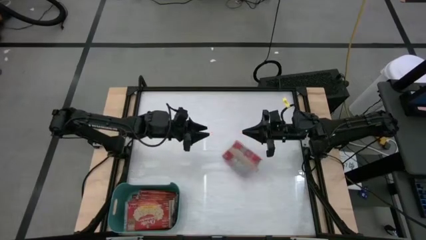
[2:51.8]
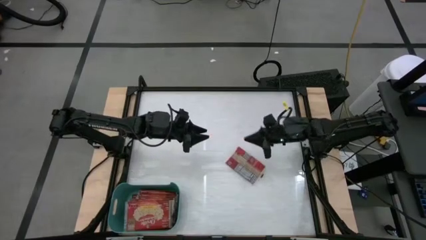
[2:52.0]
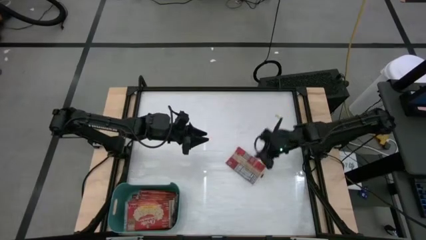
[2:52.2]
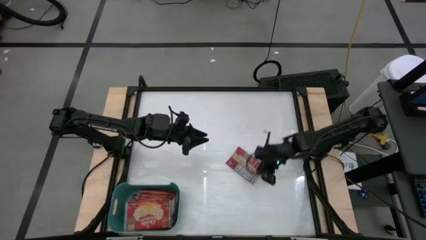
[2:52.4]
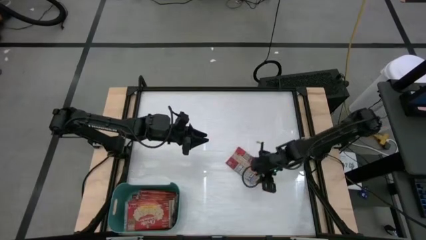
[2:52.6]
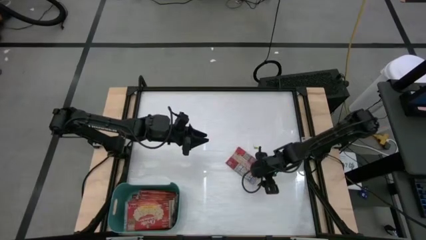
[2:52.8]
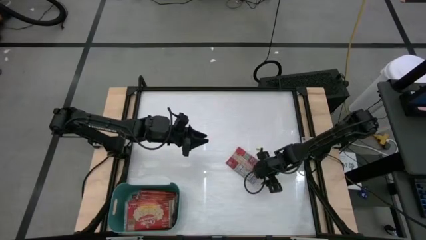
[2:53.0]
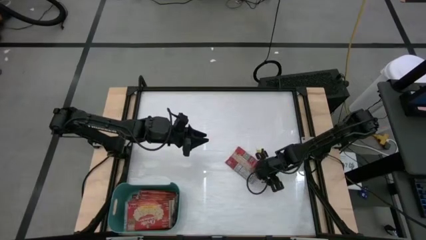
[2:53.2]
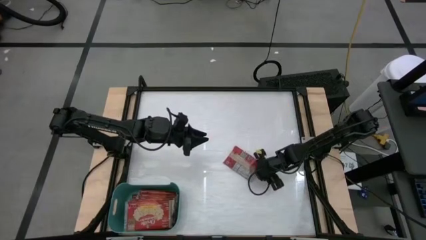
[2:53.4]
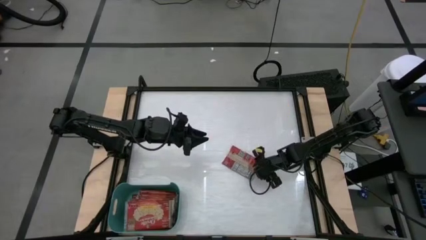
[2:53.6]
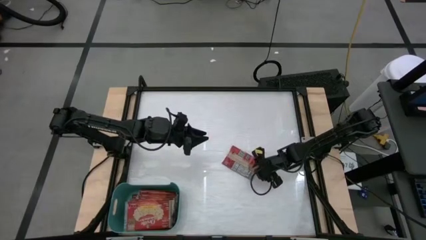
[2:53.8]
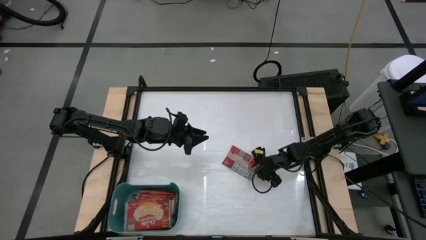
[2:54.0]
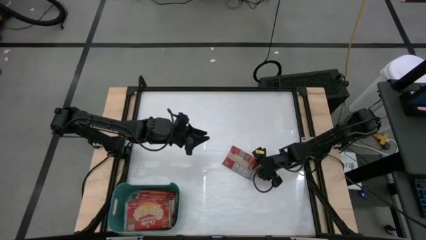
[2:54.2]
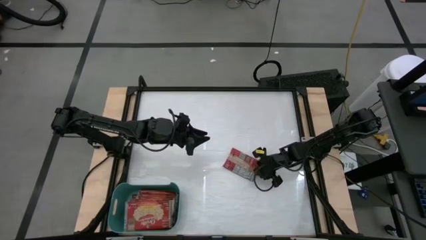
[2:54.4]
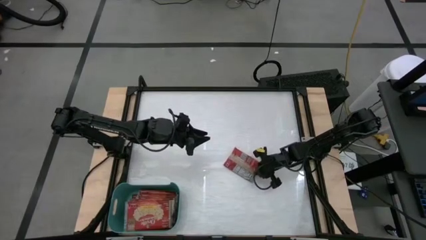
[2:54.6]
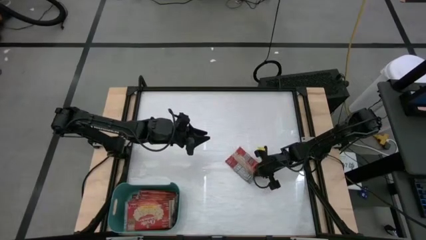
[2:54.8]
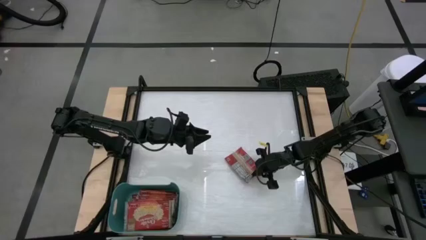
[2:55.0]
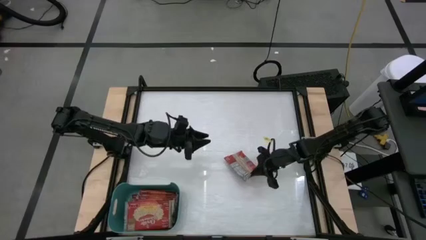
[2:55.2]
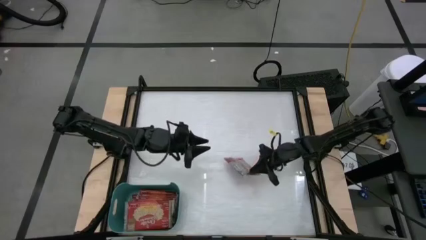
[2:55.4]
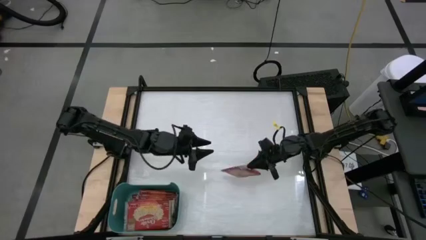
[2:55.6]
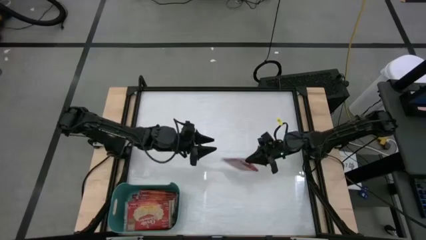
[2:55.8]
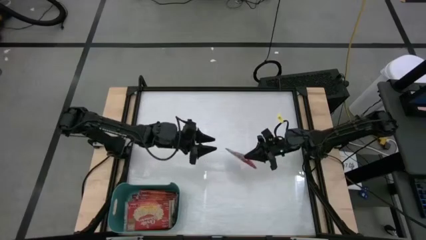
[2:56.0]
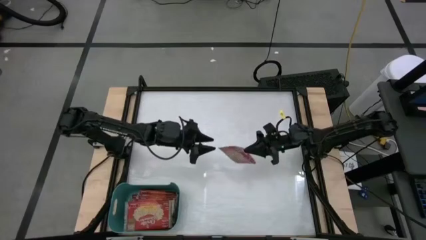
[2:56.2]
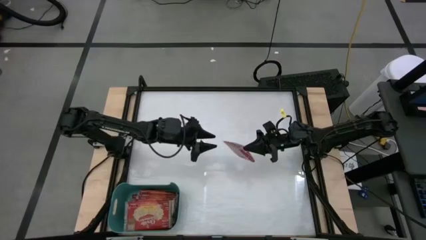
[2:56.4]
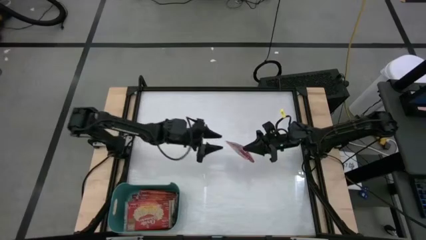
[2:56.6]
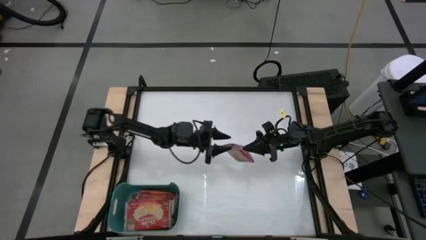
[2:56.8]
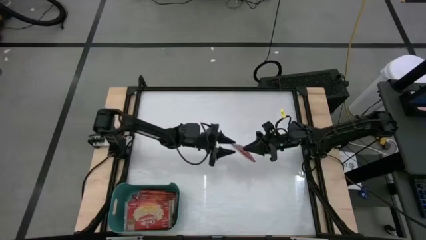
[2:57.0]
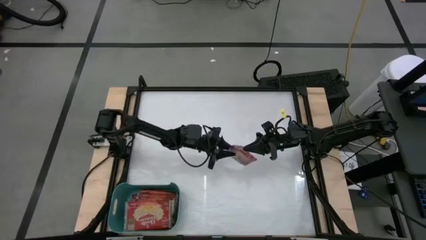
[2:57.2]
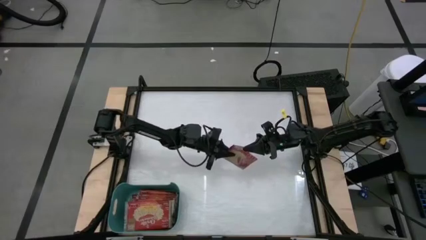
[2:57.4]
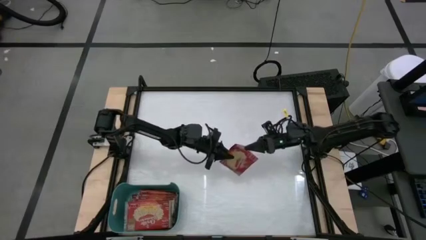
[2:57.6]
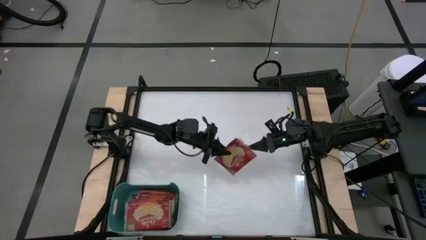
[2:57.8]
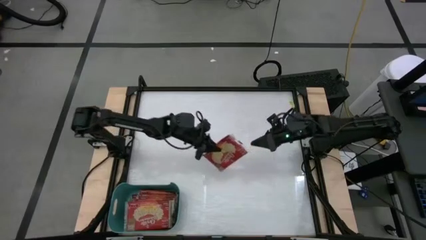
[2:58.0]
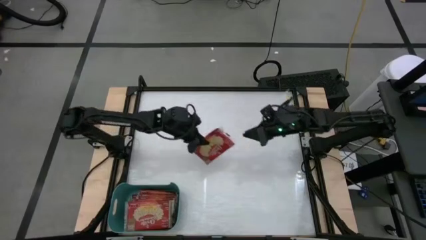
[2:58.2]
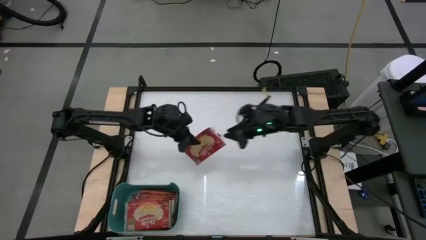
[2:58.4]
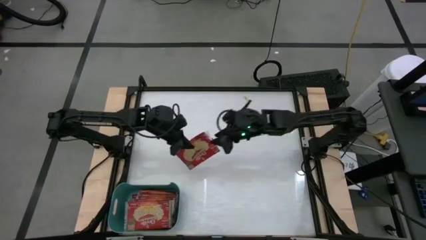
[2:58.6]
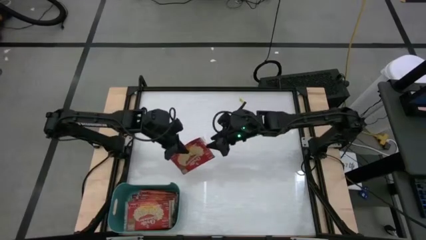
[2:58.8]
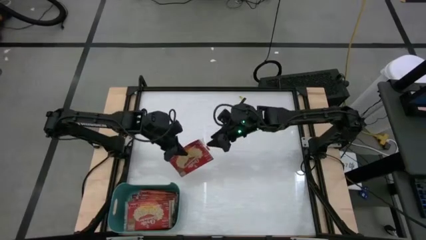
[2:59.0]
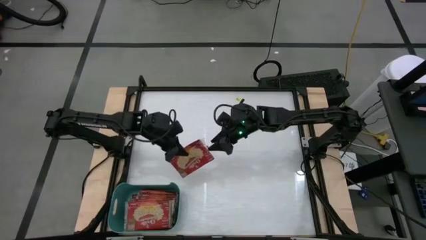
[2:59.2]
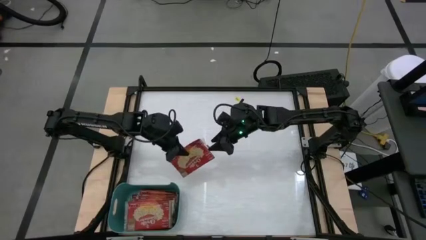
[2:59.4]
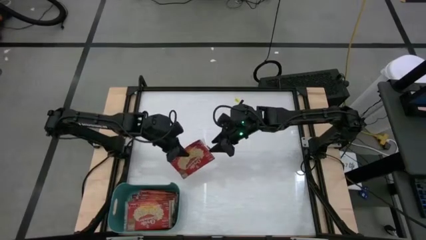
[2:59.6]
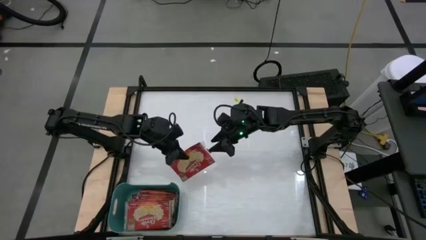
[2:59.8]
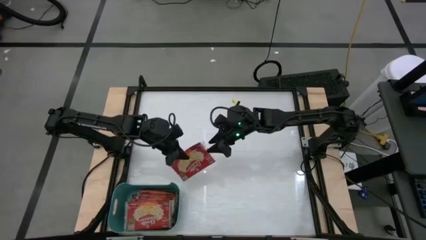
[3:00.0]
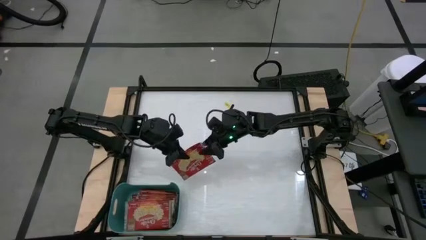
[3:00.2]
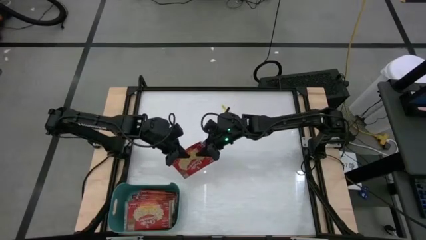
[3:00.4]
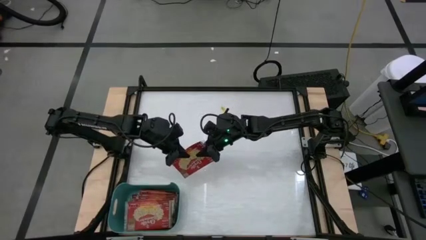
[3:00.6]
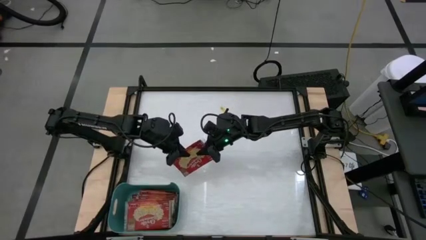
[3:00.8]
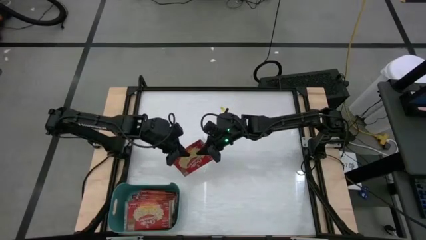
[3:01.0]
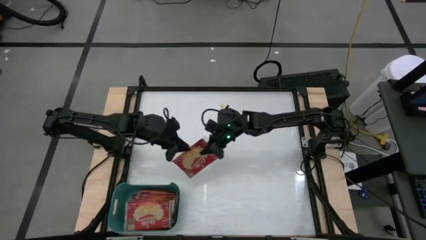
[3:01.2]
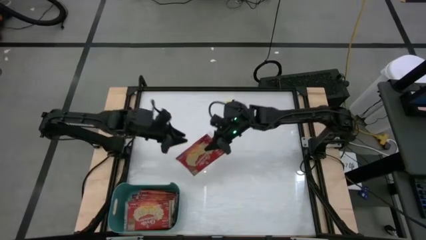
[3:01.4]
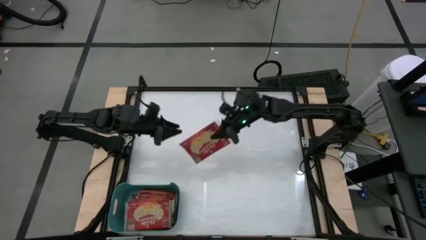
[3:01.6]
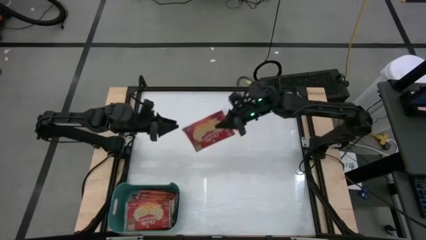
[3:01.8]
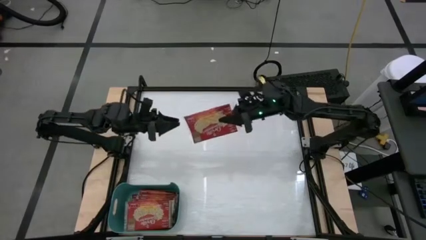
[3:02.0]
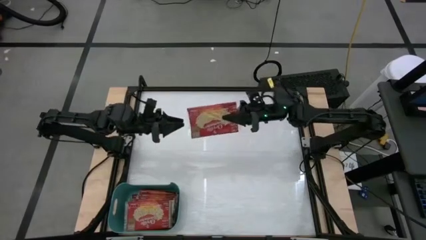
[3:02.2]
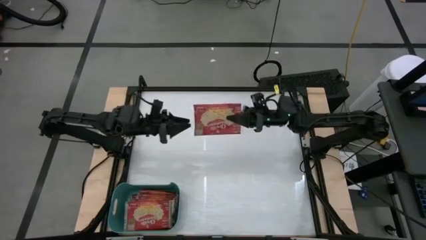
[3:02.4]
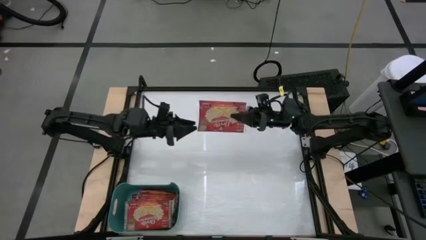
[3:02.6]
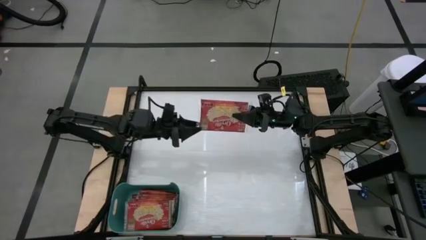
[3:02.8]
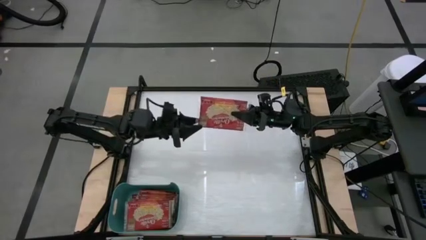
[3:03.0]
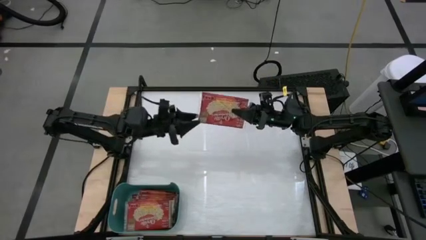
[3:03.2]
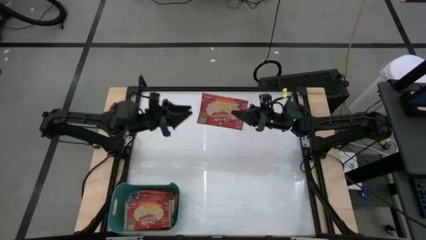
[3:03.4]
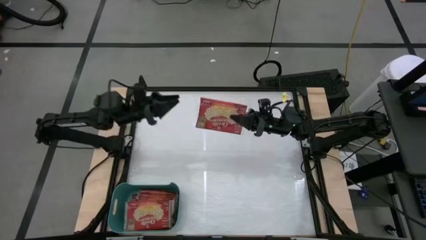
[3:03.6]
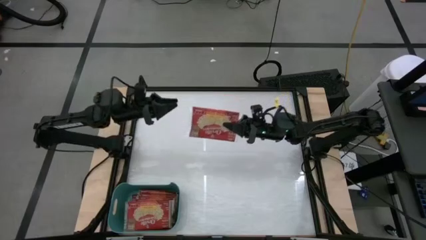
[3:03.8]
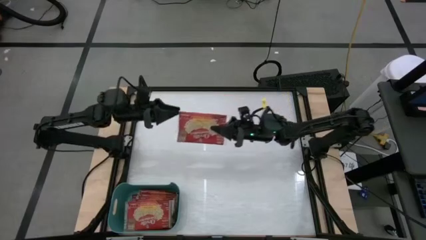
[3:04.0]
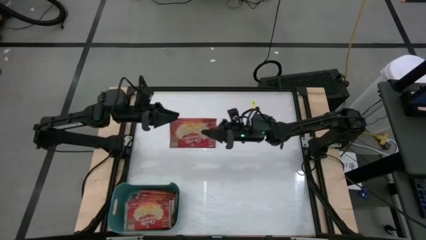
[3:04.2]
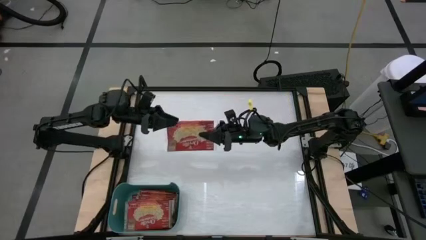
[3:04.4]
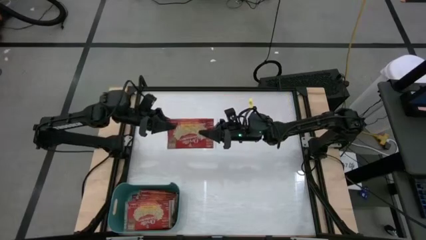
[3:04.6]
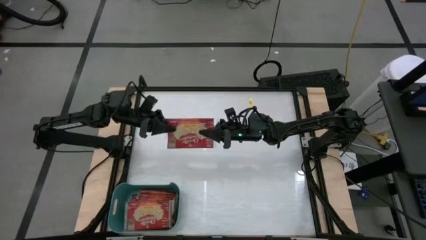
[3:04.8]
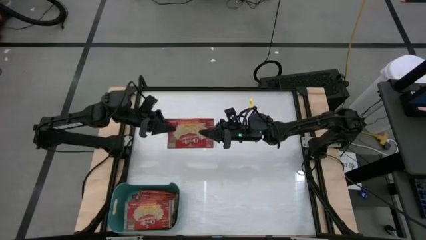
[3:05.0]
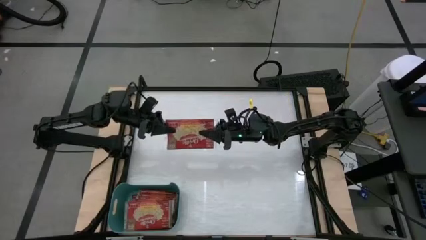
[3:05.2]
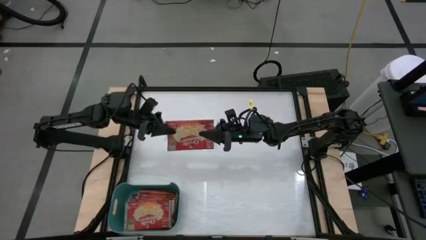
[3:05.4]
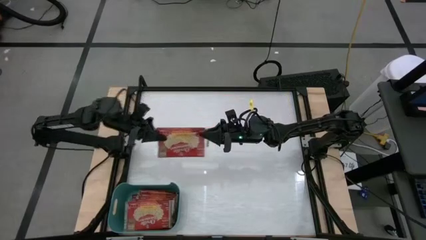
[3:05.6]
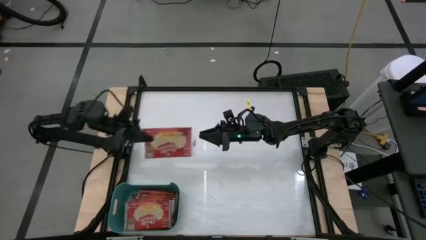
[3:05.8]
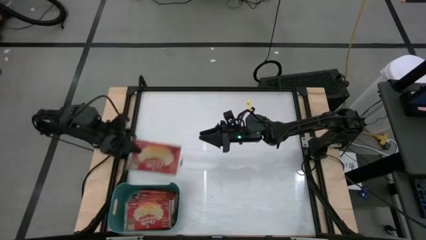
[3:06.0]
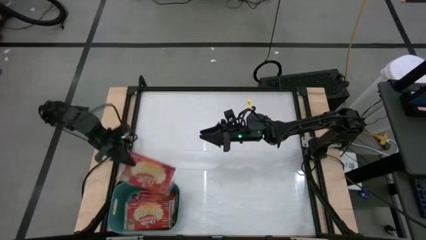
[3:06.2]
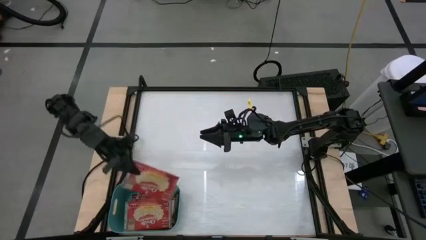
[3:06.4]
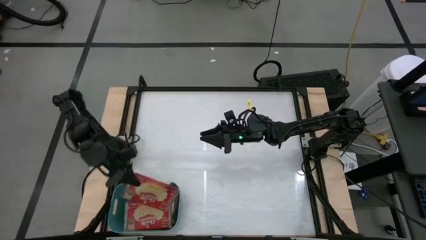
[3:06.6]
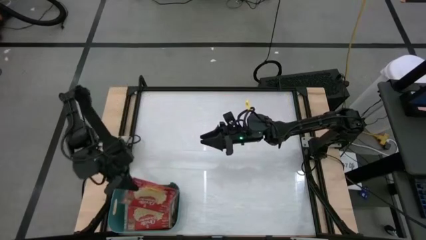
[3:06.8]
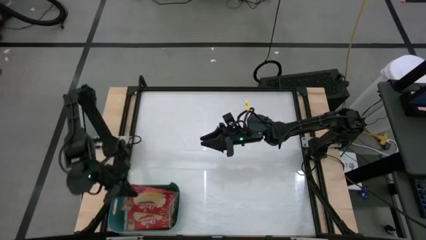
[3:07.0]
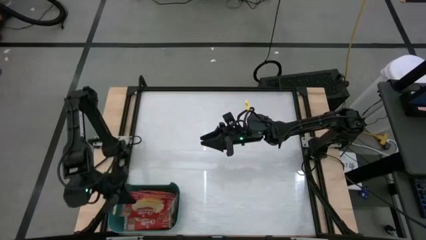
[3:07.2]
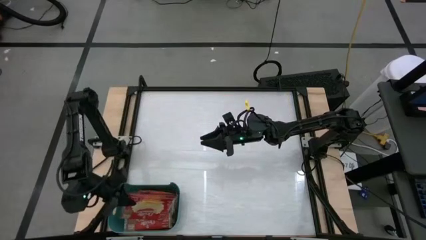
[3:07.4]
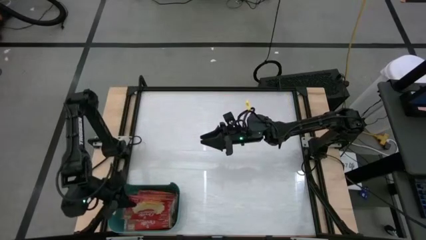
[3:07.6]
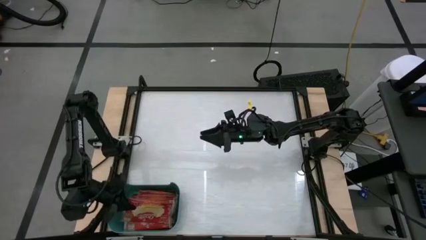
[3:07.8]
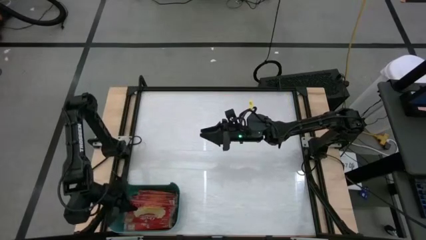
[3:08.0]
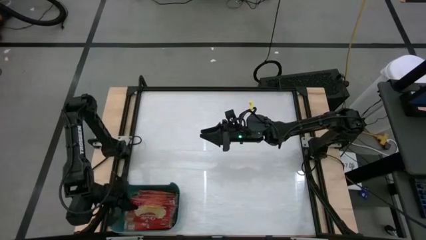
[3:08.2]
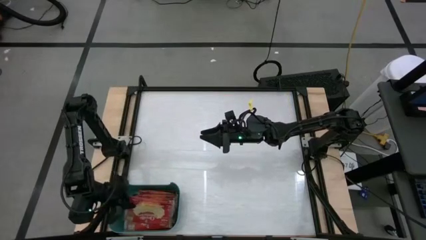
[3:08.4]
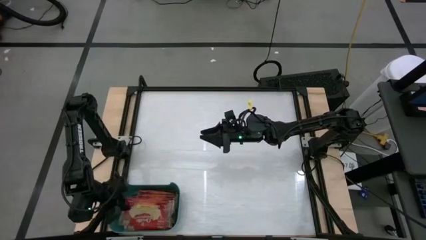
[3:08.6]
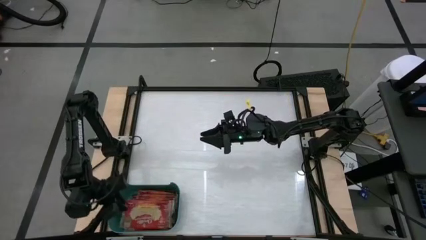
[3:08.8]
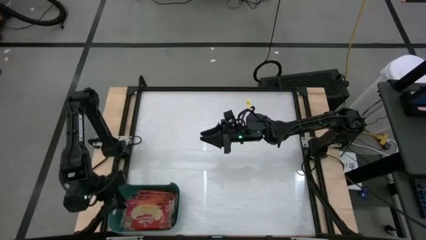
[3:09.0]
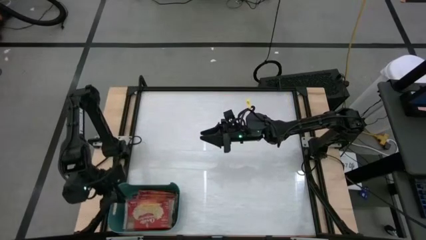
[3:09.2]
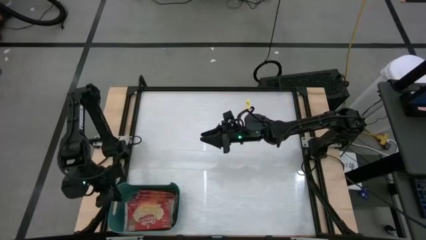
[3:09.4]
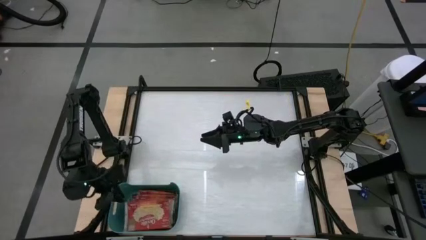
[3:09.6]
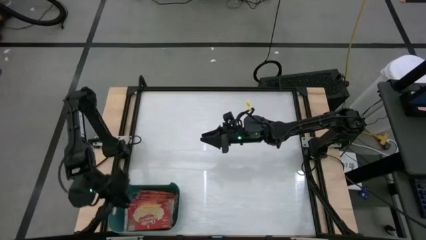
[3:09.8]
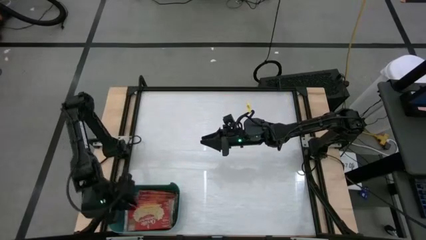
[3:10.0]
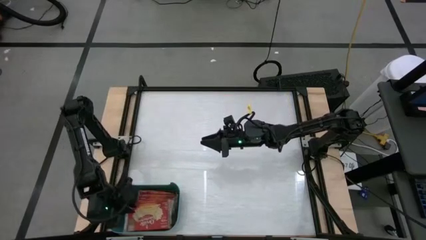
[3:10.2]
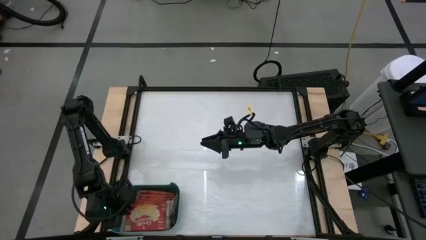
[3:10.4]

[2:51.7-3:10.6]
Task: Sort popcorn bags into baskets
Put the red popcorn bag into the green bin
